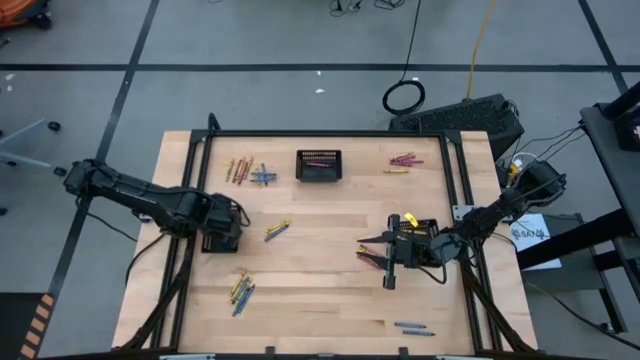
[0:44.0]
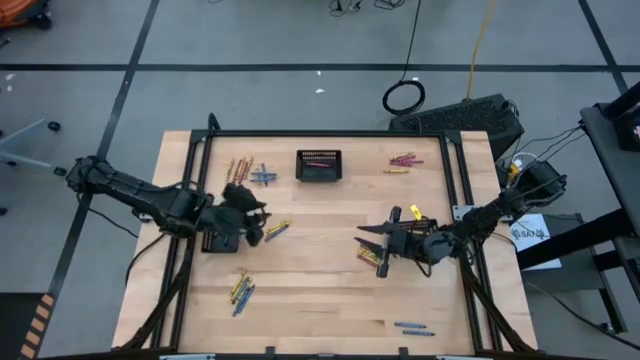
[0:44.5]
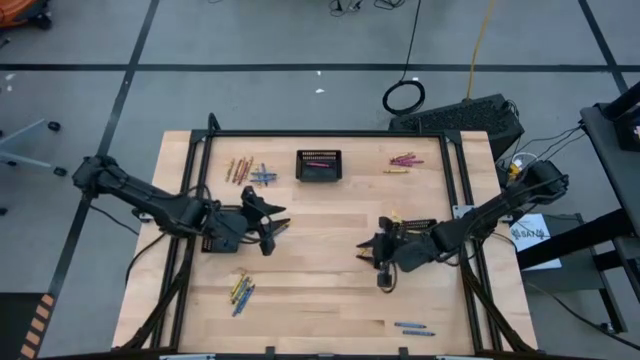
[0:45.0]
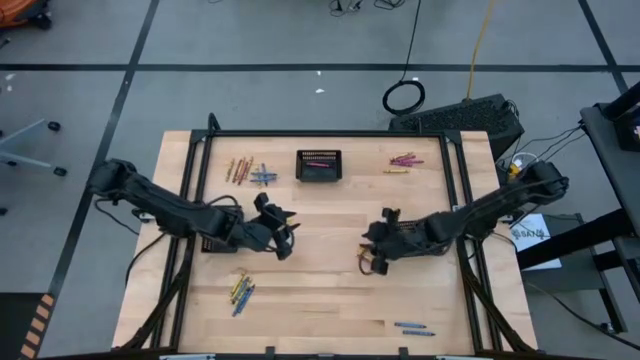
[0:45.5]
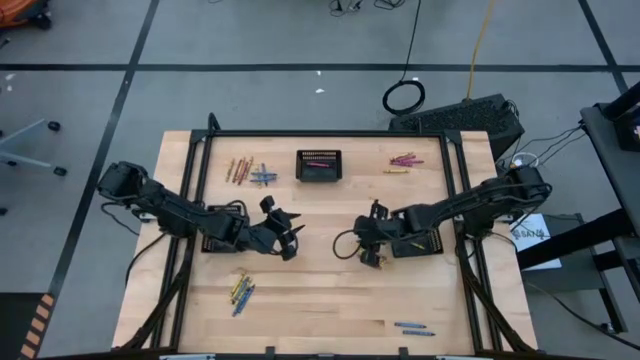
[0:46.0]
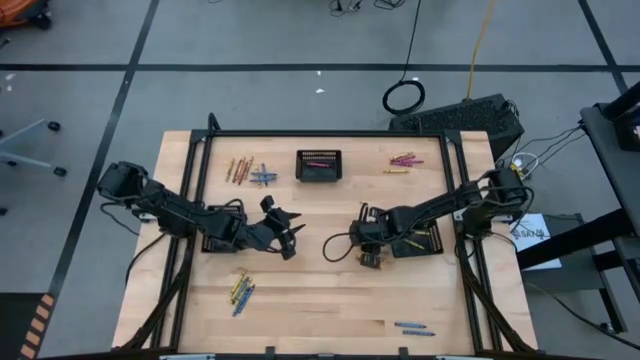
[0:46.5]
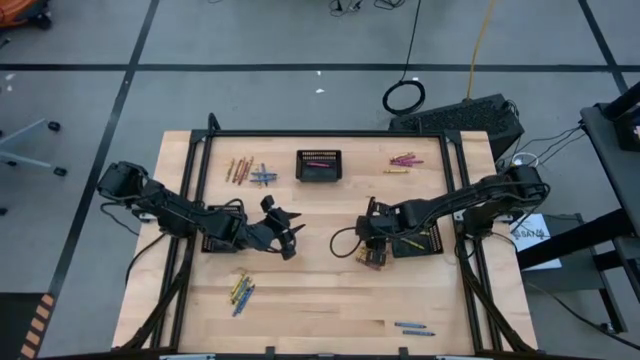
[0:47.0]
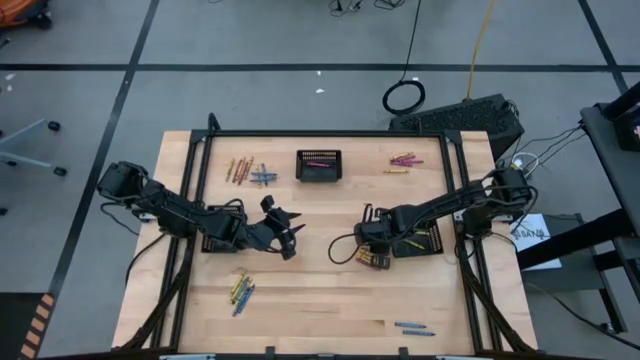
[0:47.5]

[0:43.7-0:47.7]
Task: Sort crayons
Put the red crayon into the top black bin

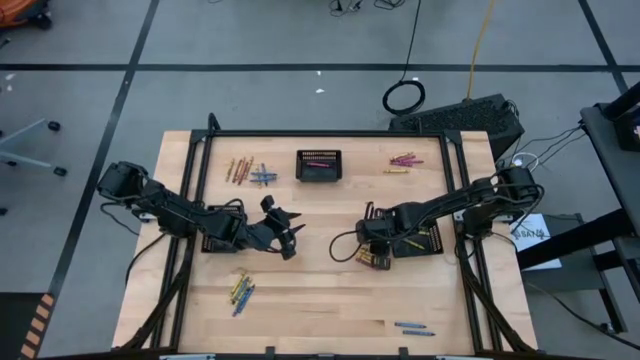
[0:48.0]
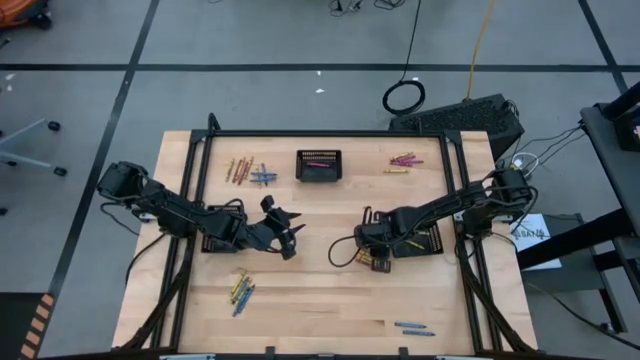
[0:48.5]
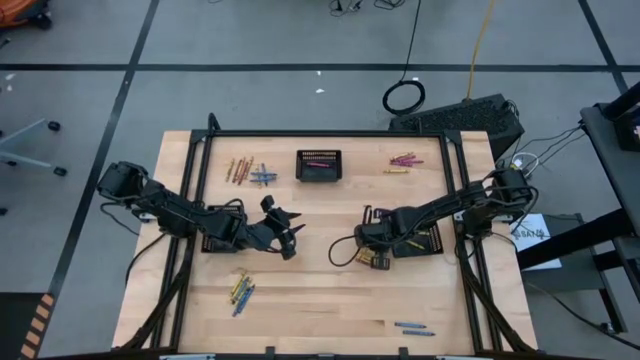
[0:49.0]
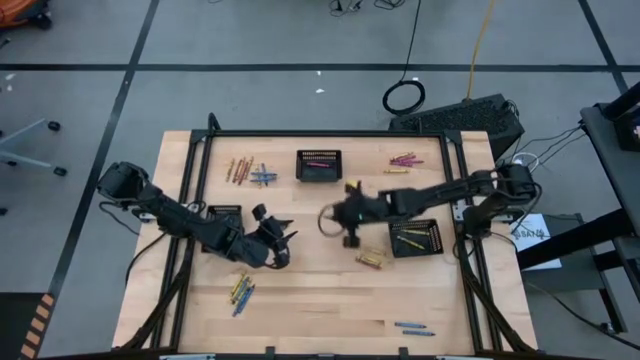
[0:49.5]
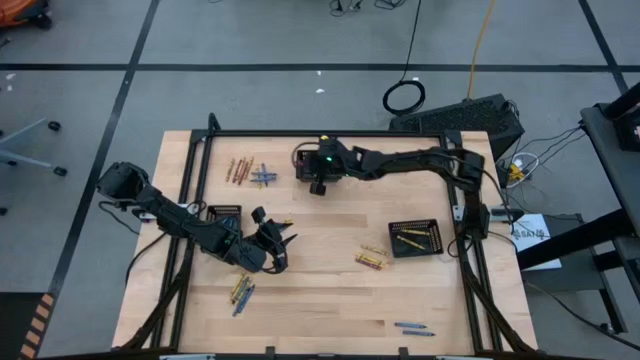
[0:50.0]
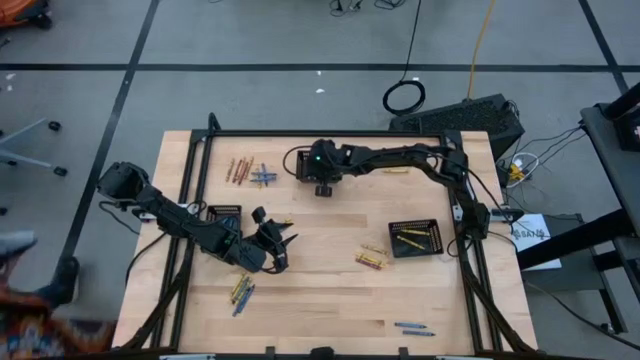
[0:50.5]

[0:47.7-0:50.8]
Put the red crayon into the top black bin

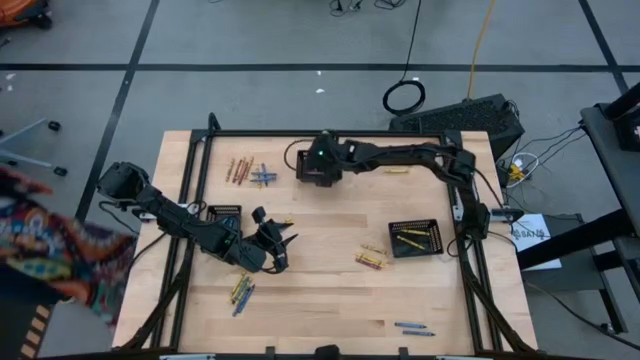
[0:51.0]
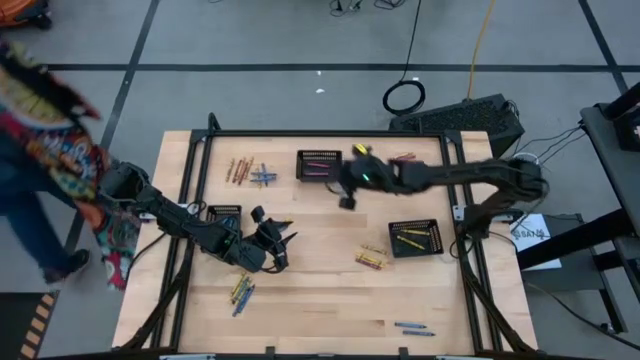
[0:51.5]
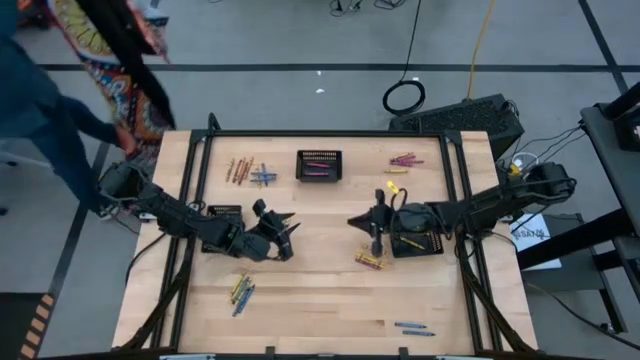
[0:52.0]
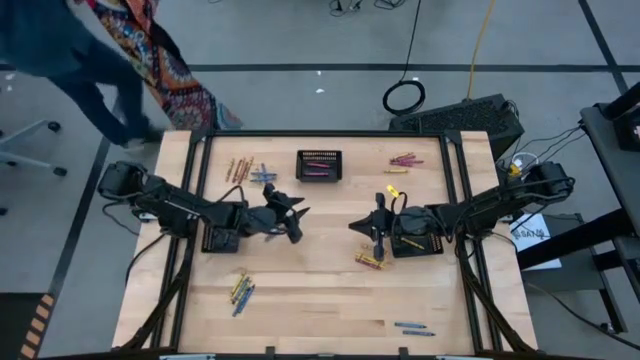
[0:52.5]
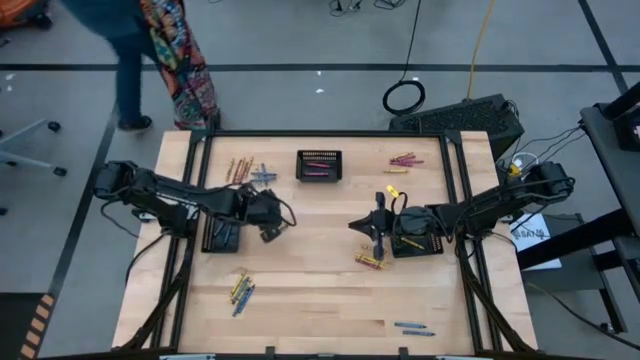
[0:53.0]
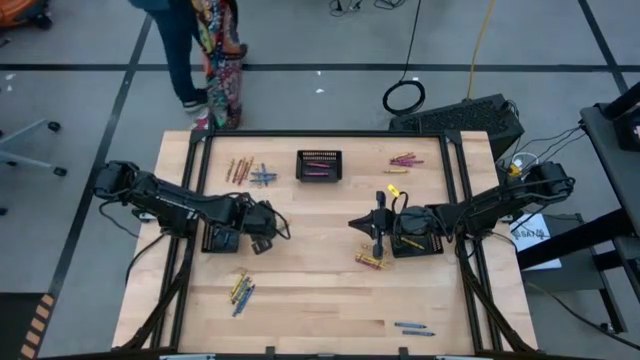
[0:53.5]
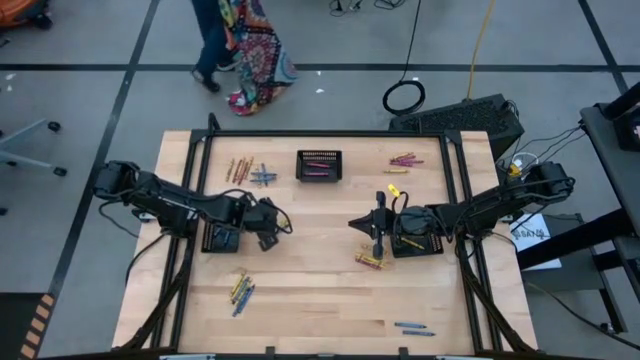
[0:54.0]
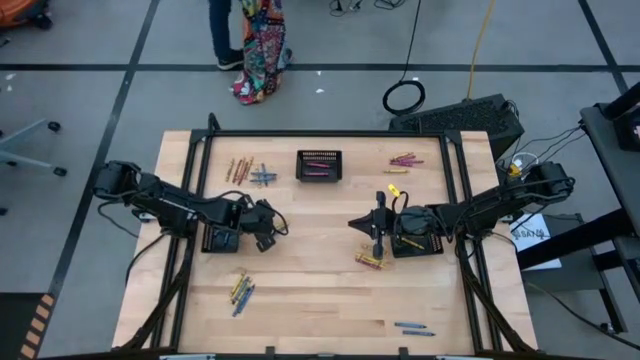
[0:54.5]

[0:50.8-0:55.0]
Put the yellow crayon into the bottom right black bin

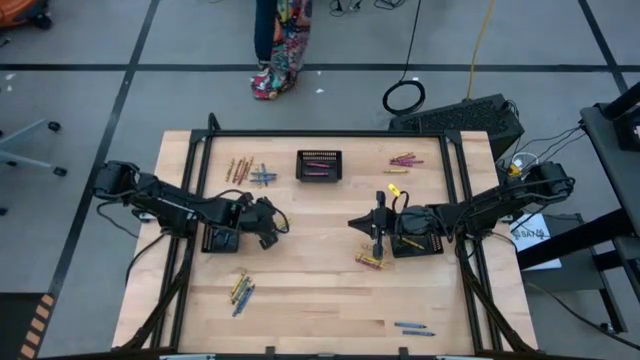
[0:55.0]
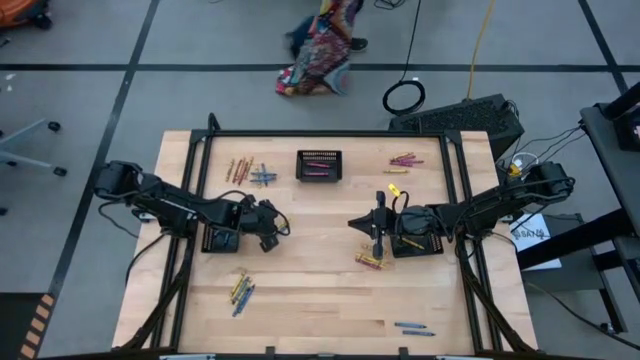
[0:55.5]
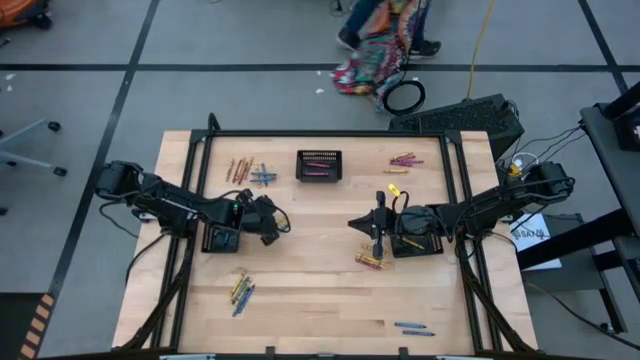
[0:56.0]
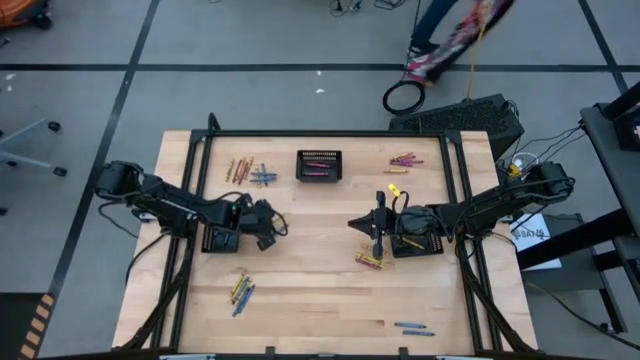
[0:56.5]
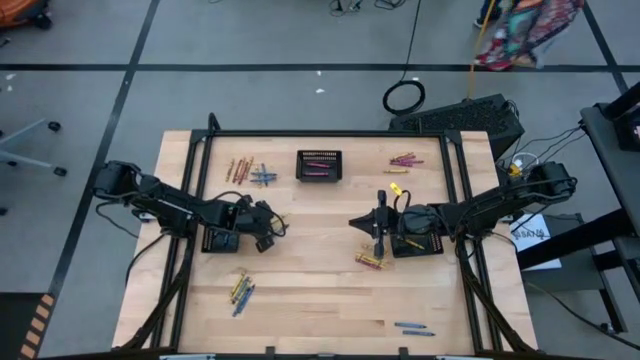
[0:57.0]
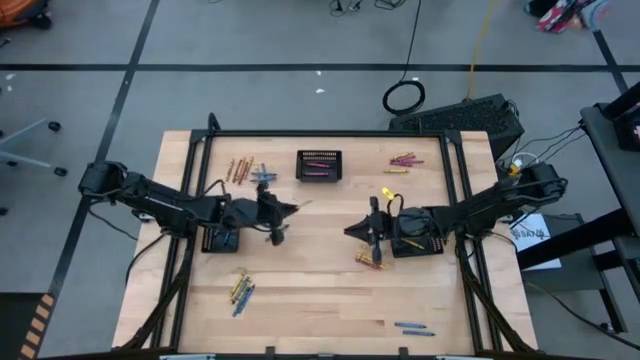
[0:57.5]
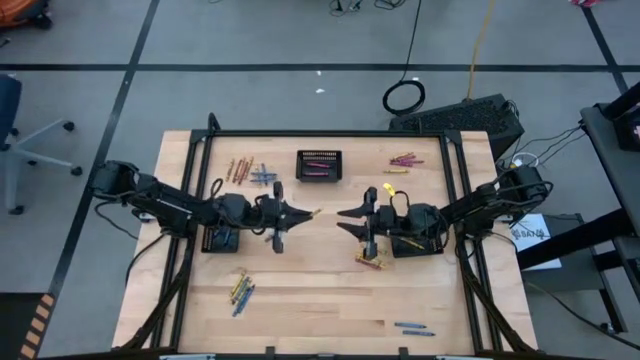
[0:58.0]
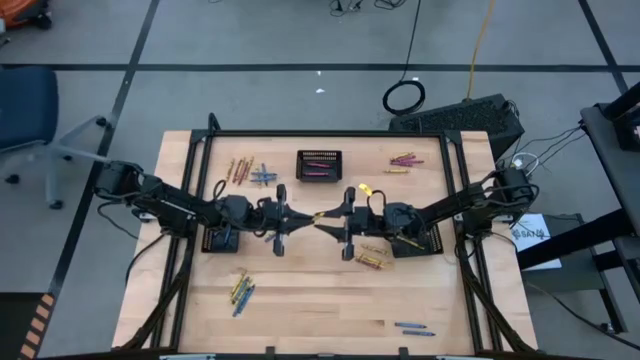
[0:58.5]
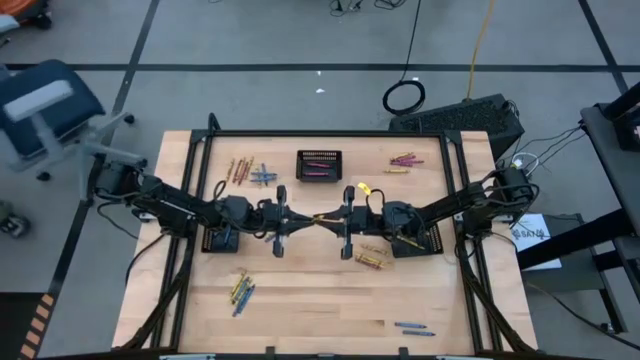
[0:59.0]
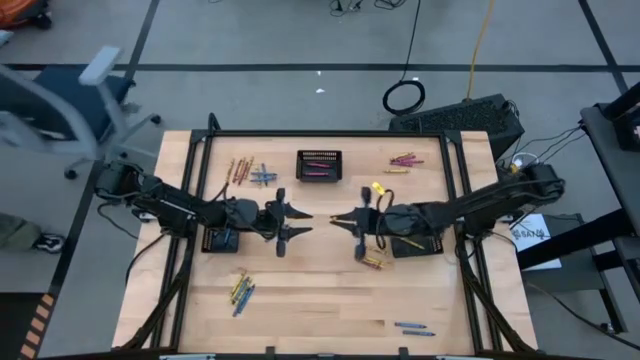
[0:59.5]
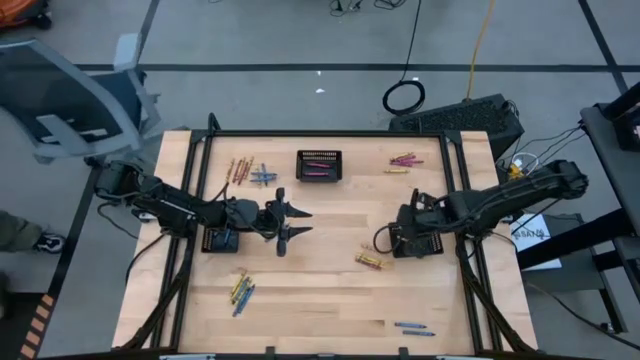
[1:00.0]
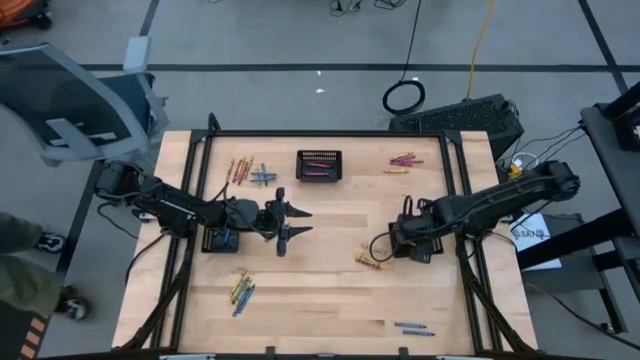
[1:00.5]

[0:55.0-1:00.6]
Put the yellow crayon into the bottom right black bin

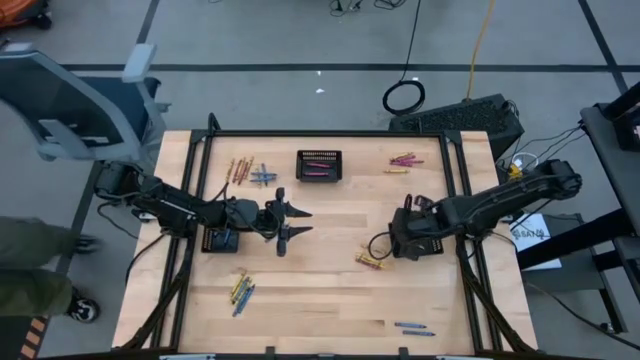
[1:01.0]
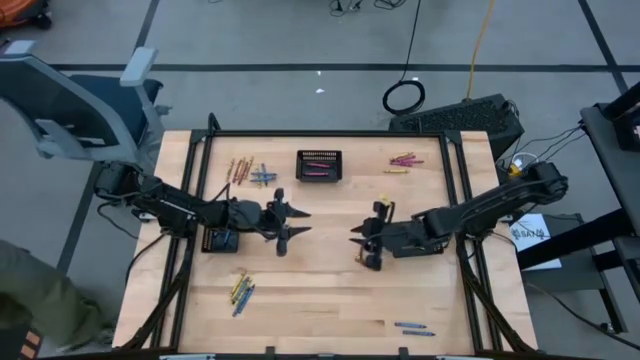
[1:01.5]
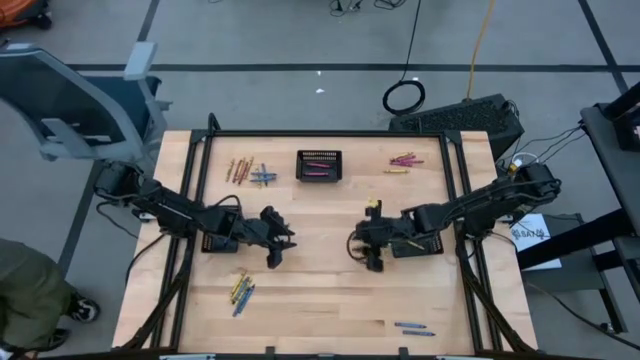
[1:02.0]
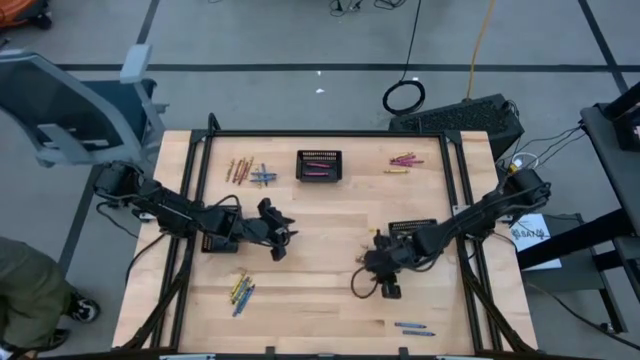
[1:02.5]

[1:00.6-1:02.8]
Put the red crayon into the top black bin

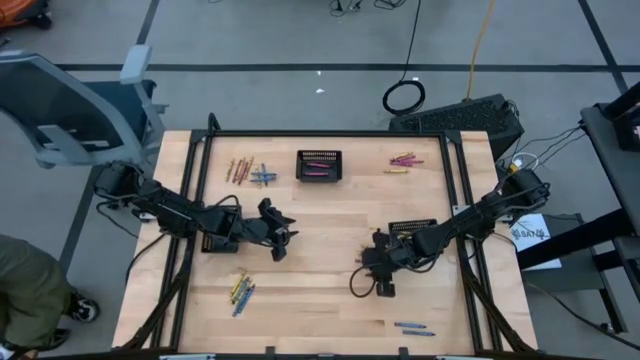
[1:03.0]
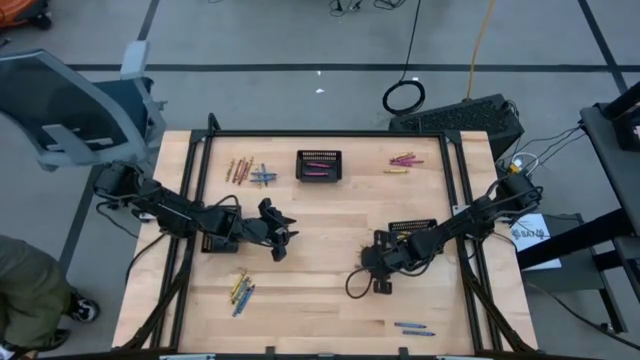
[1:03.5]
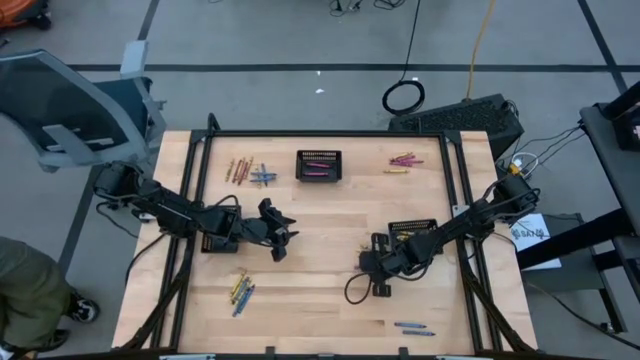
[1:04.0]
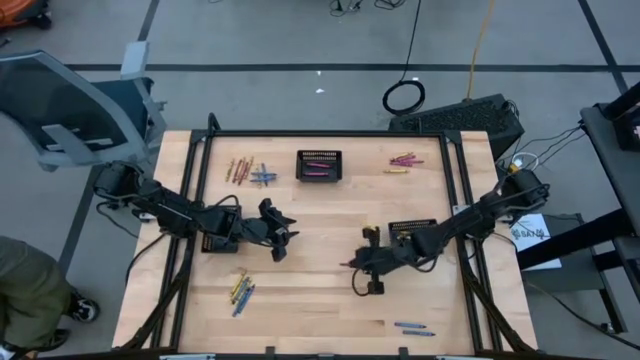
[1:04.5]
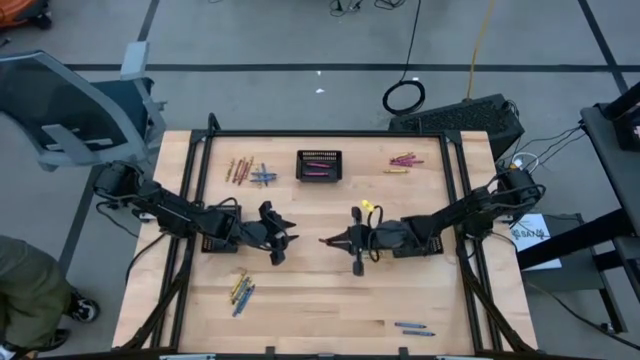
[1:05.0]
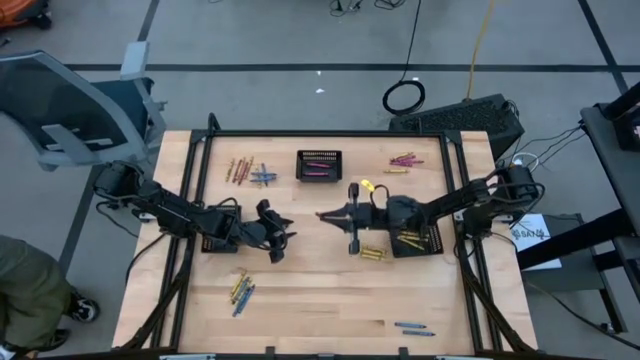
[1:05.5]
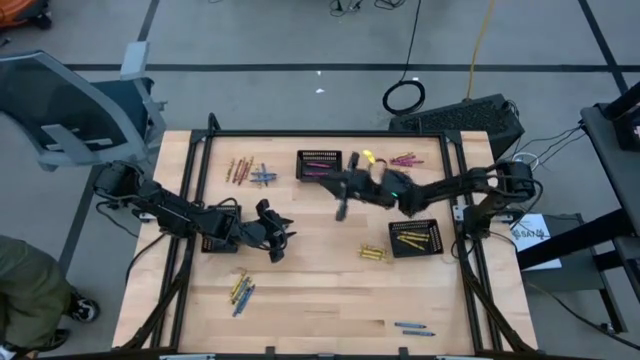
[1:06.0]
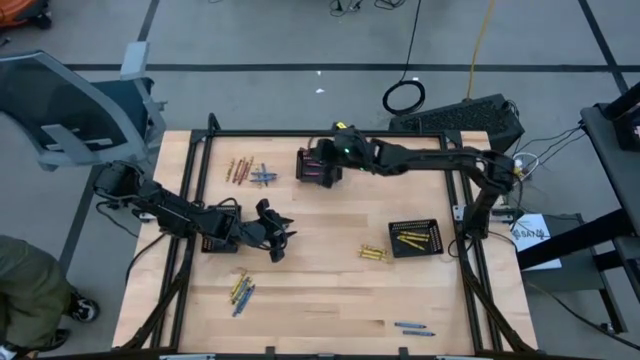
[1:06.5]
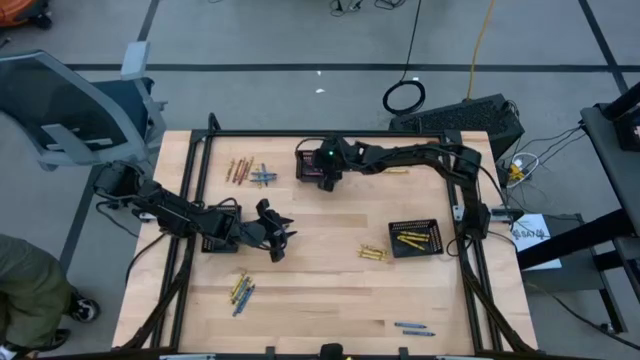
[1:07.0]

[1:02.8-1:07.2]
Put the red crayon into the top black bin
